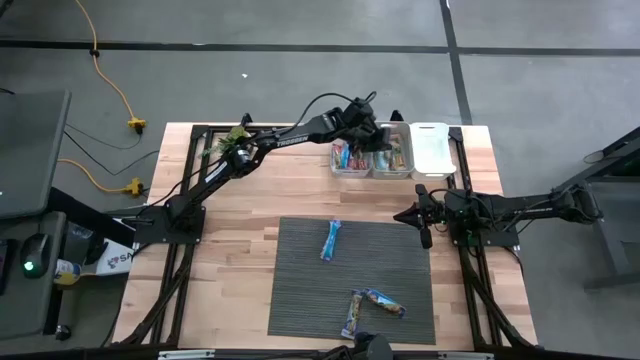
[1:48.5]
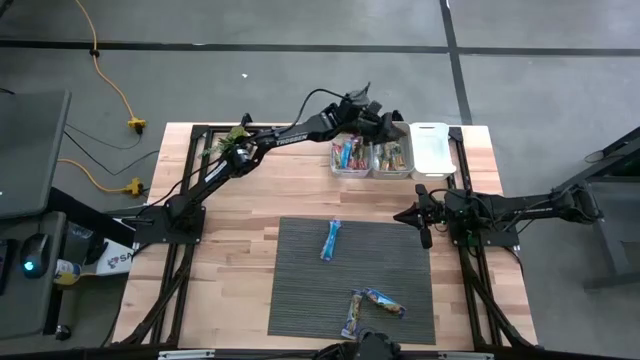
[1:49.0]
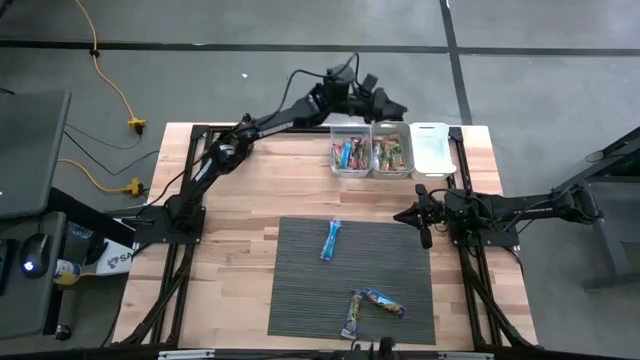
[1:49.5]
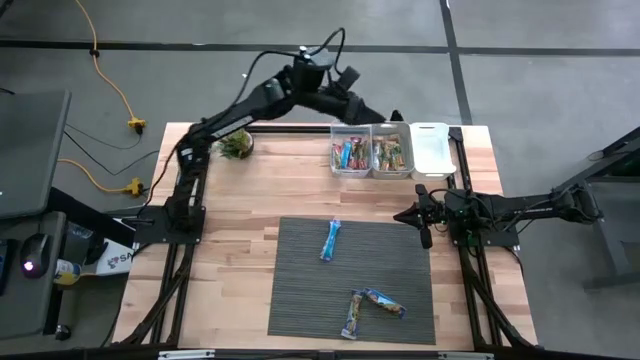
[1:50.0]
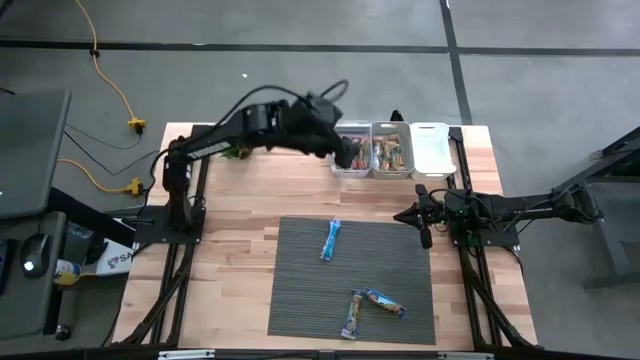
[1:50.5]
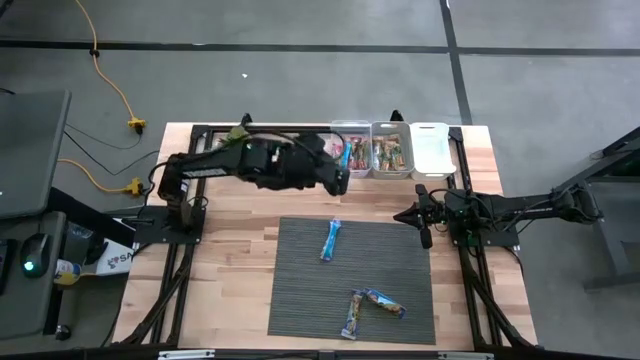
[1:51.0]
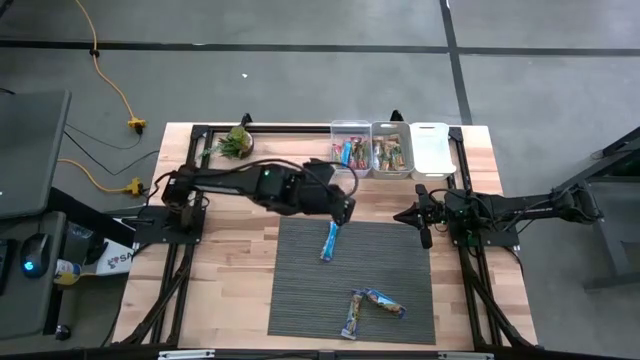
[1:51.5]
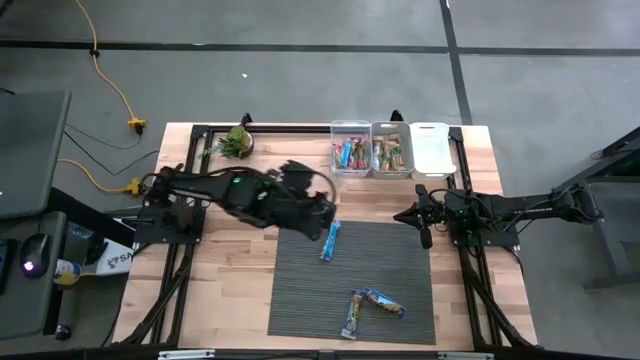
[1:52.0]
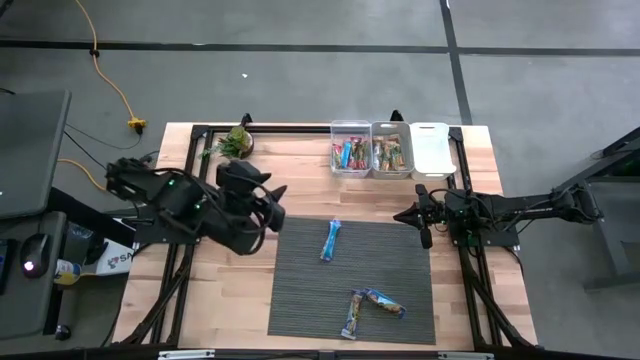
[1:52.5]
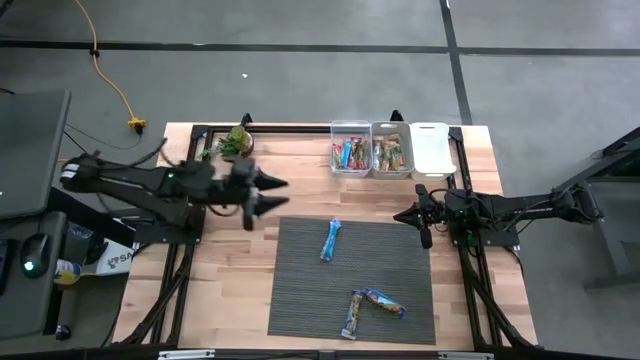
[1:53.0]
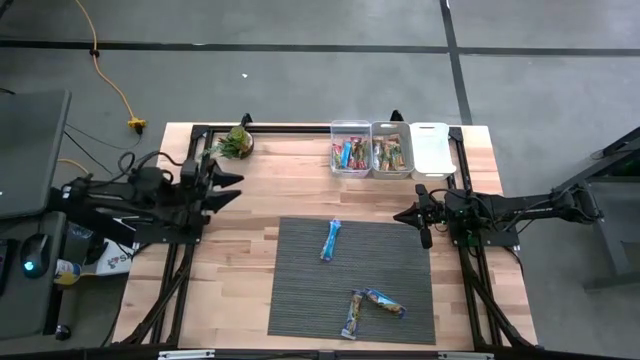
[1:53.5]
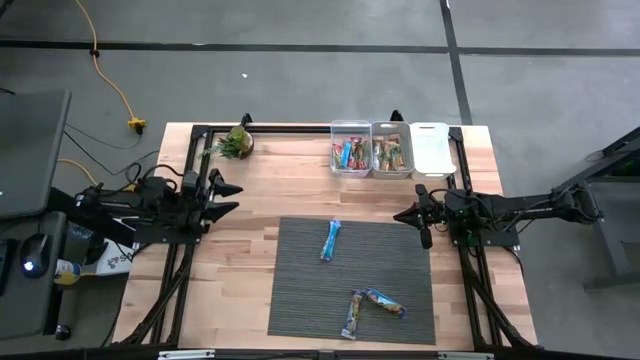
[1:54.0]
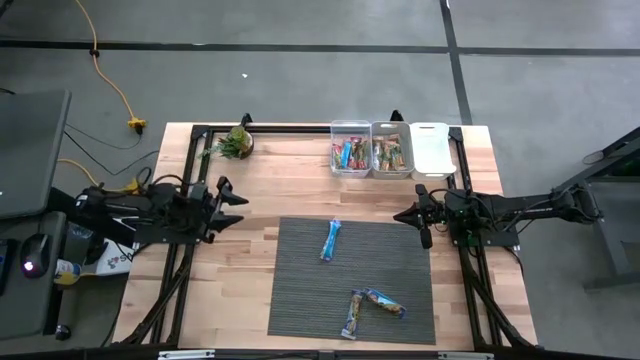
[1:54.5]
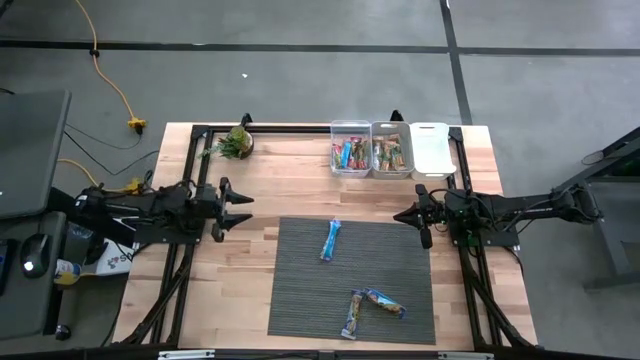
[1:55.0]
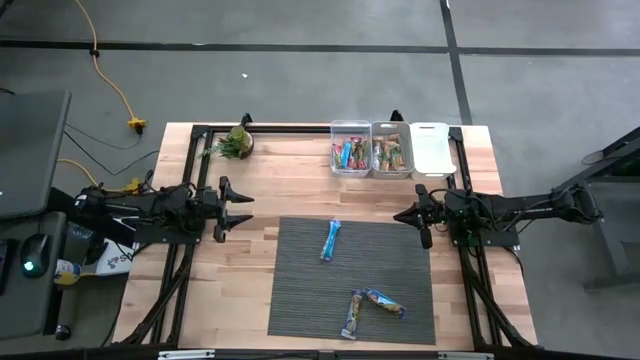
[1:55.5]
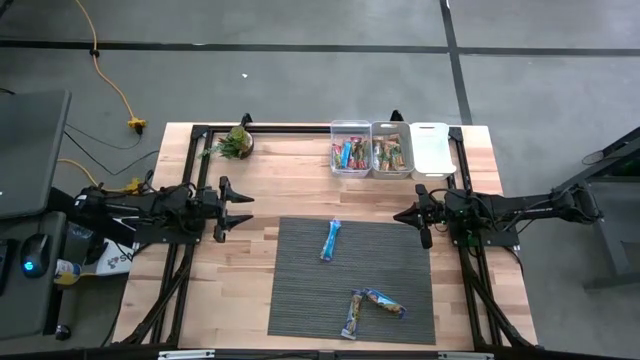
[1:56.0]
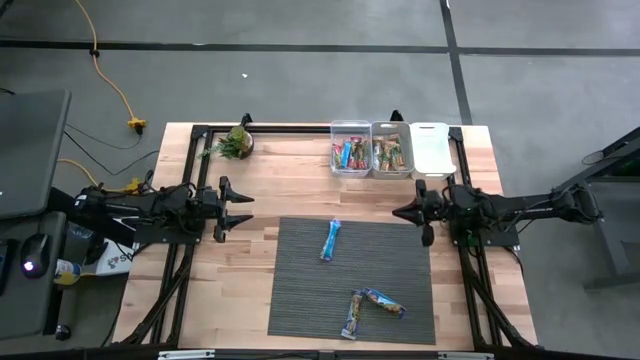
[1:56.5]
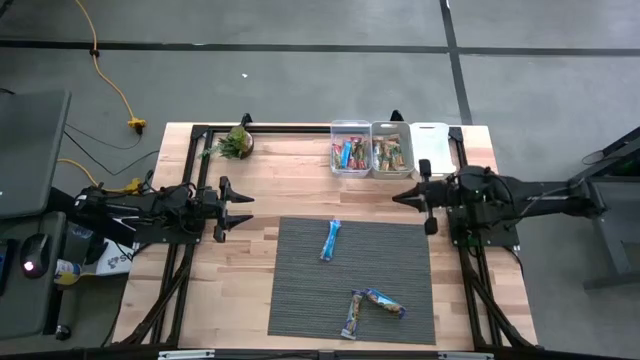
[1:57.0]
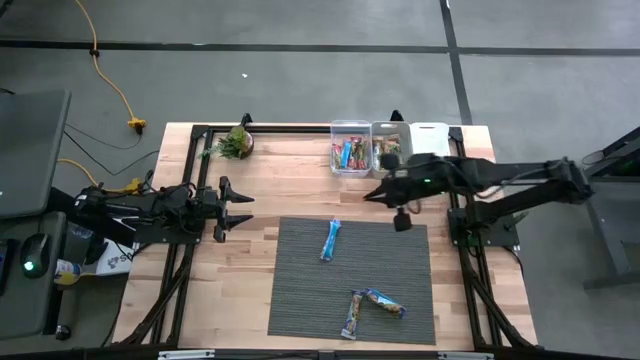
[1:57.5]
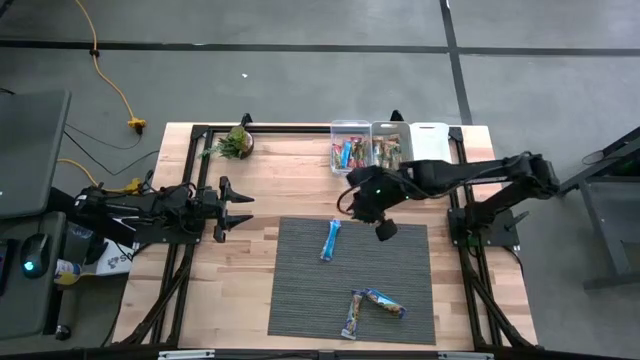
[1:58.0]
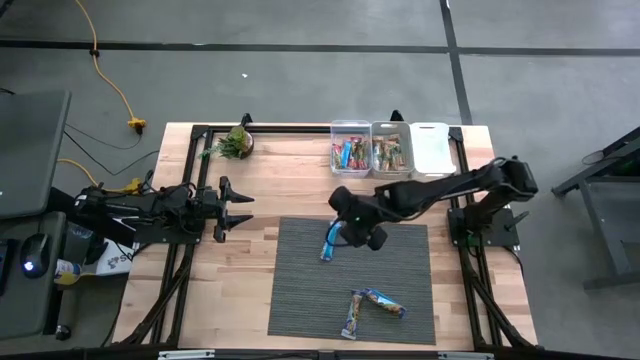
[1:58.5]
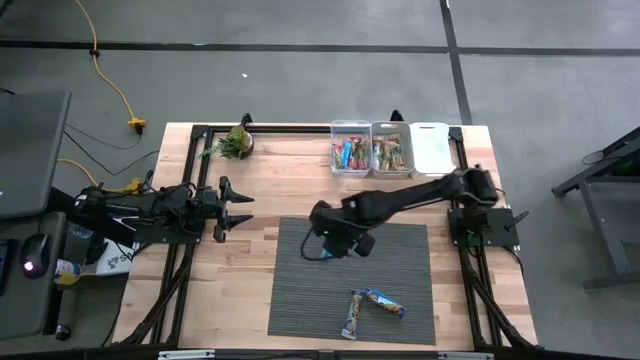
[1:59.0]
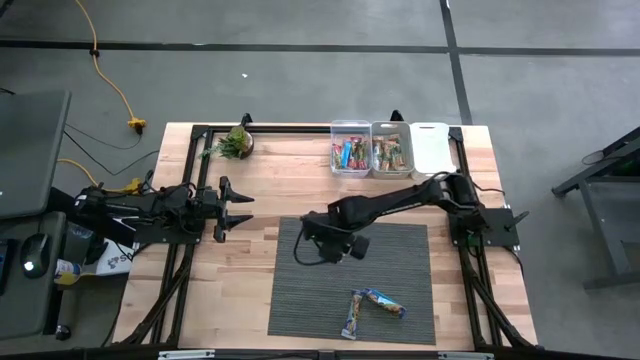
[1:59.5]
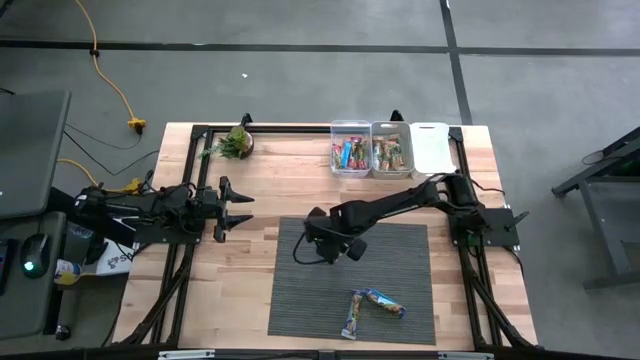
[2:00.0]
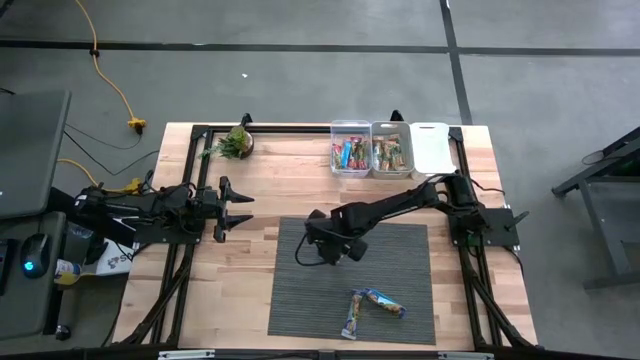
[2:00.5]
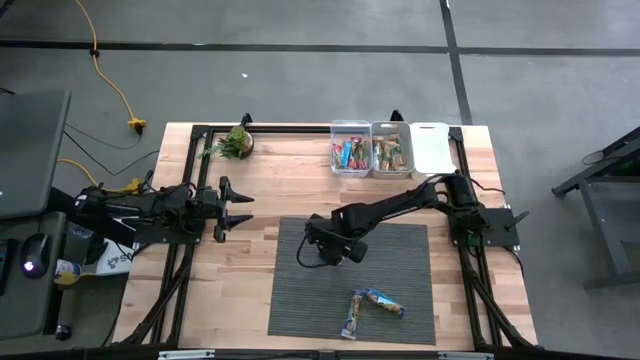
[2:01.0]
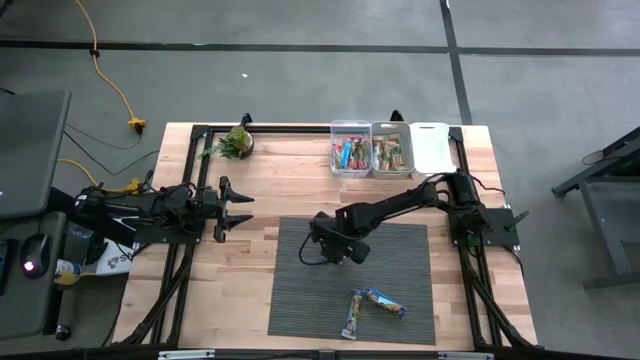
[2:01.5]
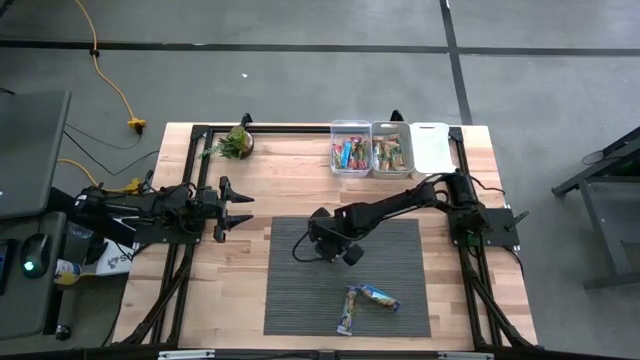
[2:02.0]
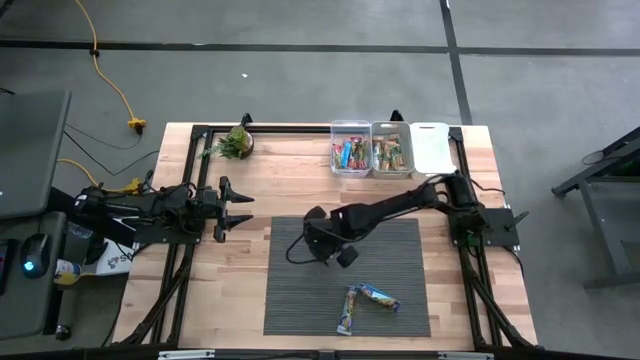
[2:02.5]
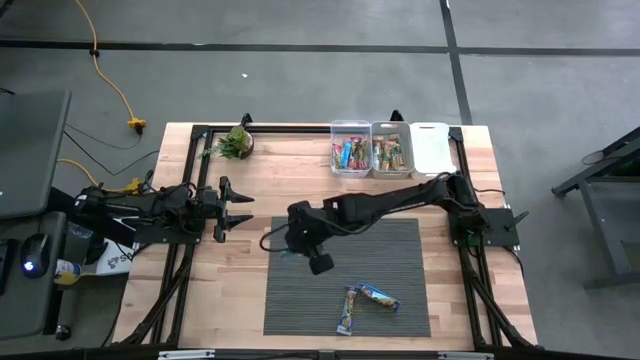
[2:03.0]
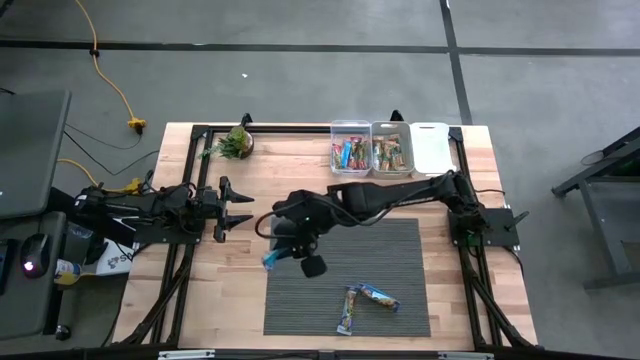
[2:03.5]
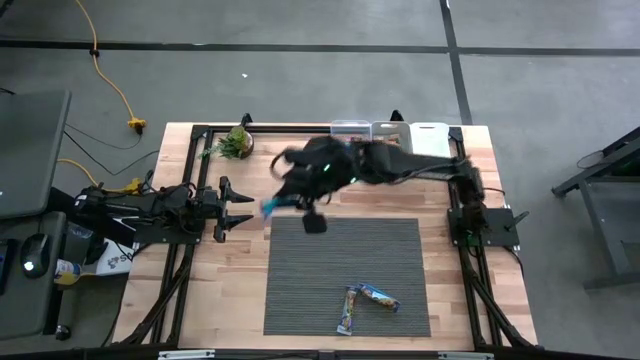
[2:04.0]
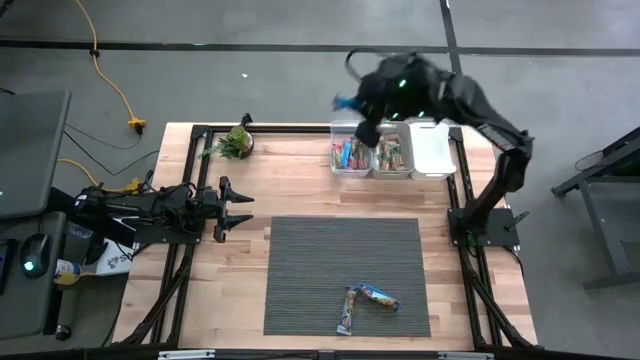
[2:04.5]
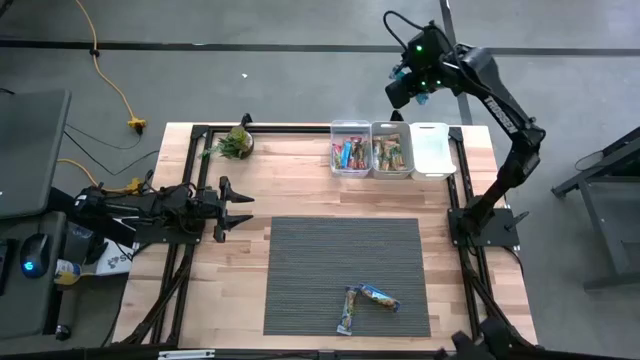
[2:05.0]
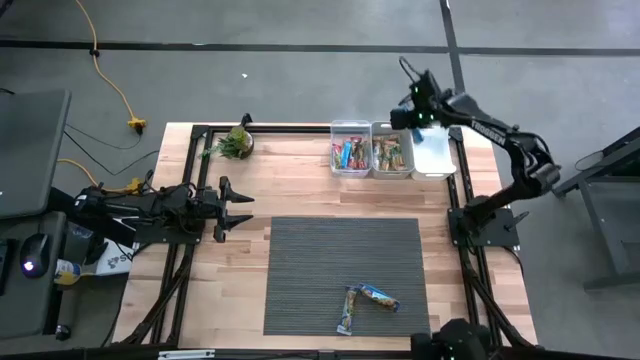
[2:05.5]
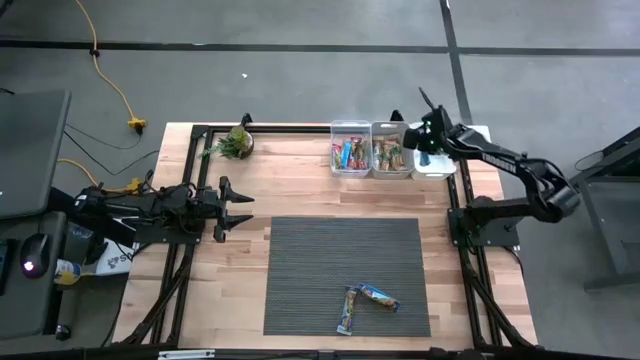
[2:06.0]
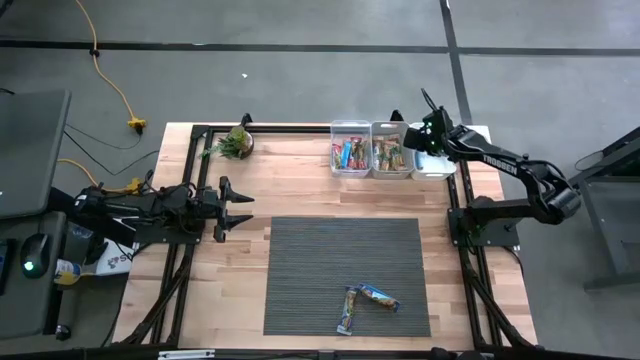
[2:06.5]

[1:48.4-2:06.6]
Task: Pick and place Granola Bars by type
Put the blue granola bar into the white bin

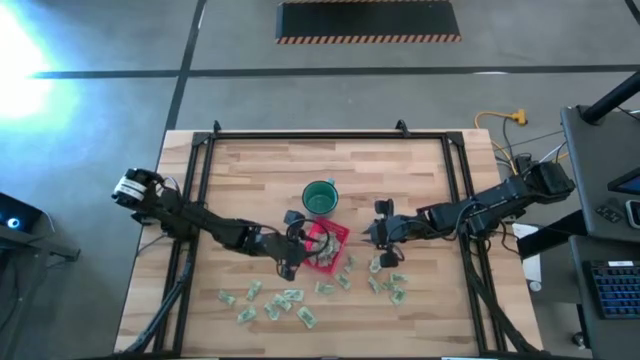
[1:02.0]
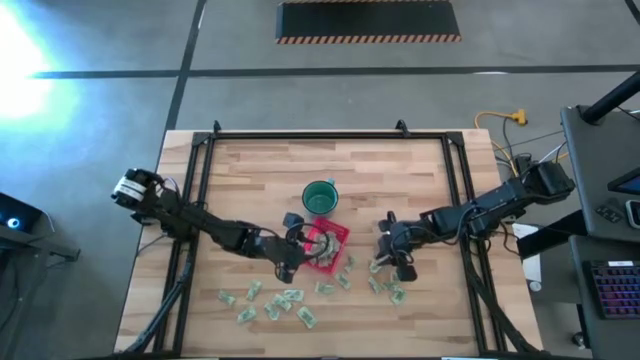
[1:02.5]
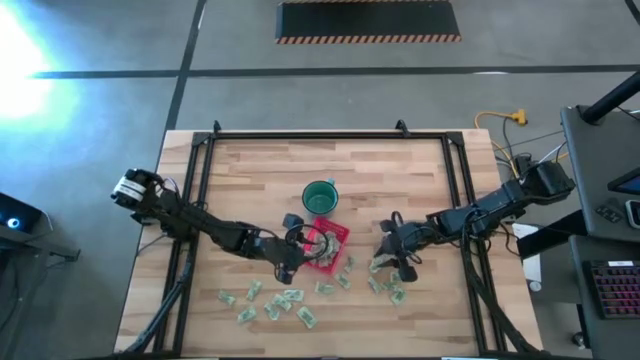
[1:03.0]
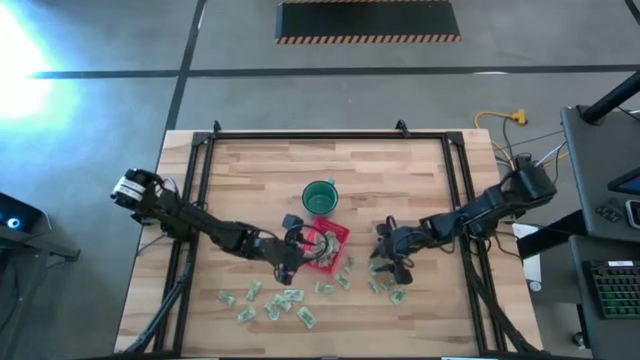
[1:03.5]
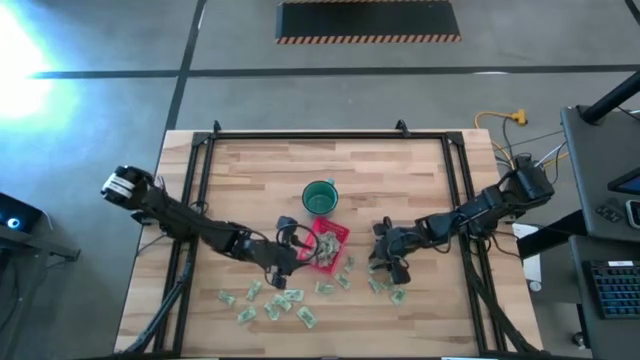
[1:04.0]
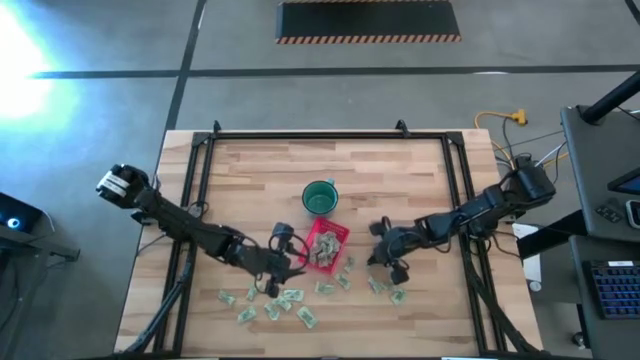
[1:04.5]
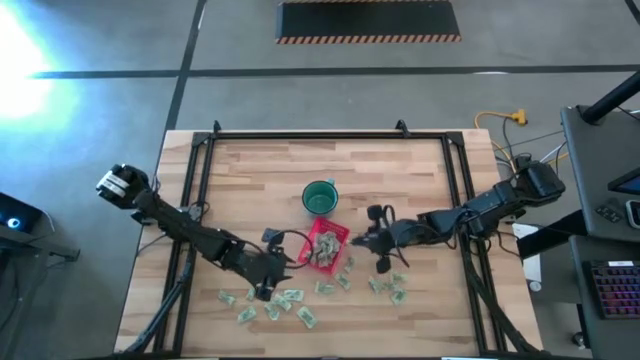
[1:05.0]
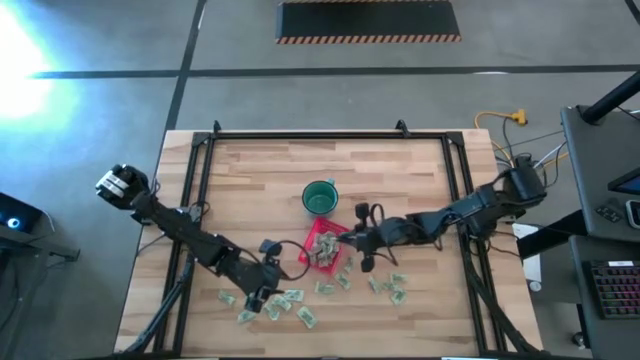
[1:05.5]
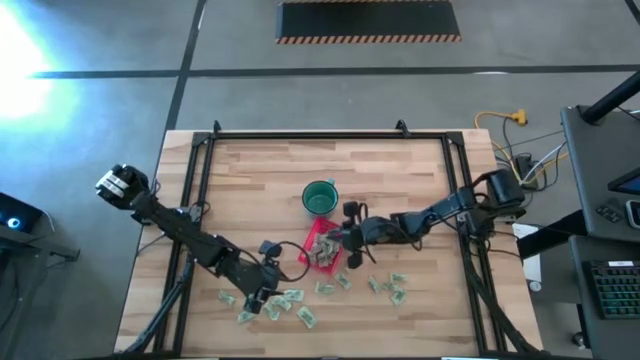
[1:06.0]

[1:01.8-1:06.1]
Task: Pick and place items into bin
Put the light green stevia packet into the red bin
